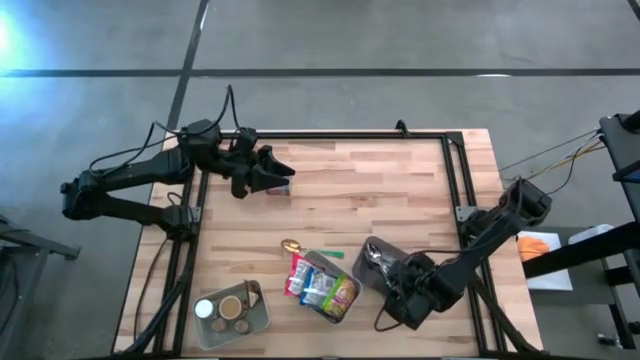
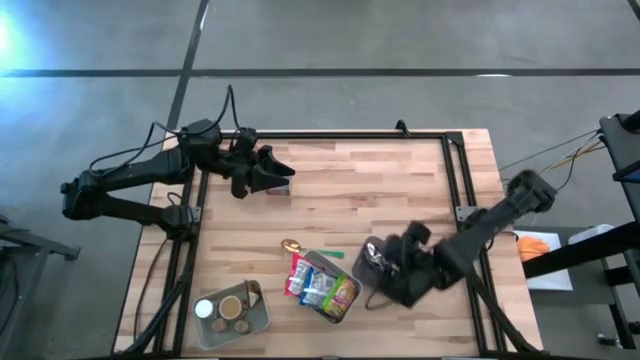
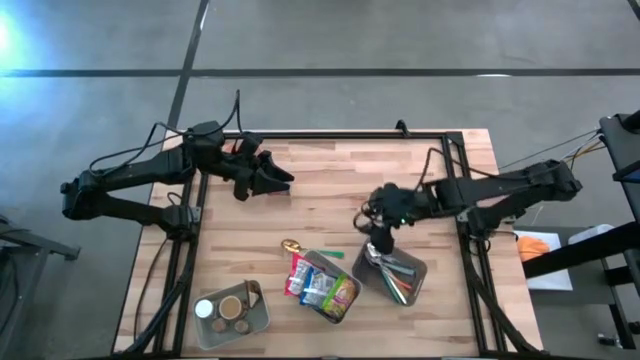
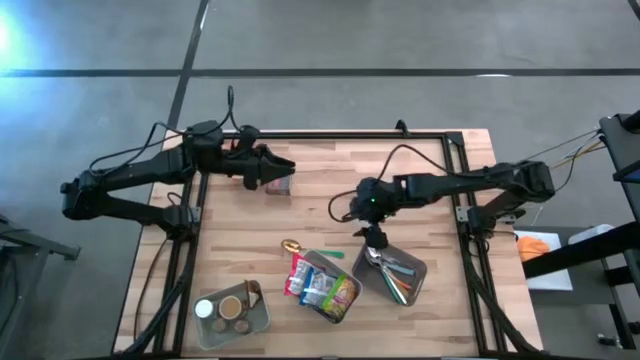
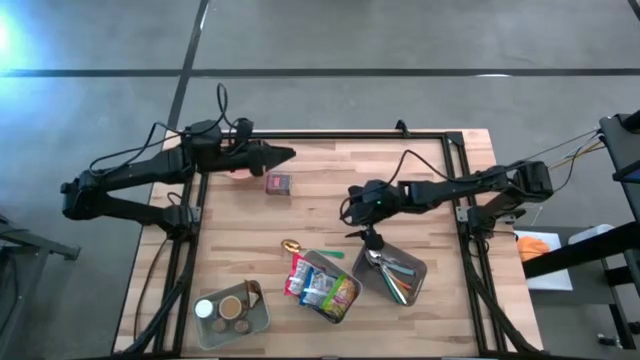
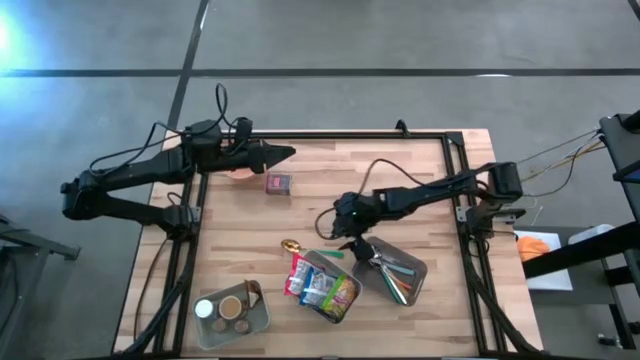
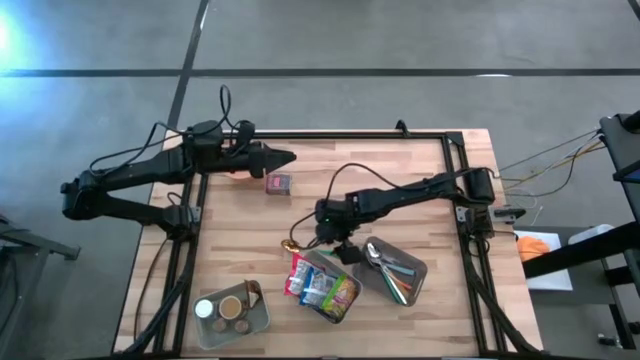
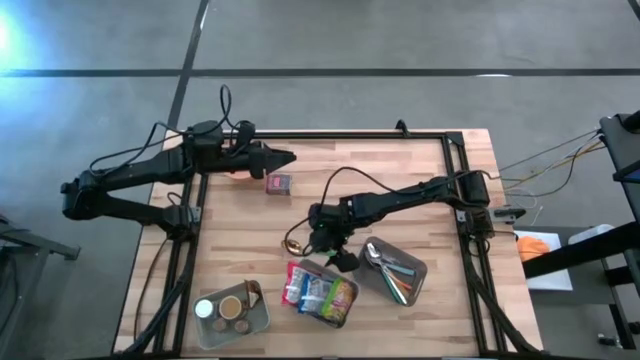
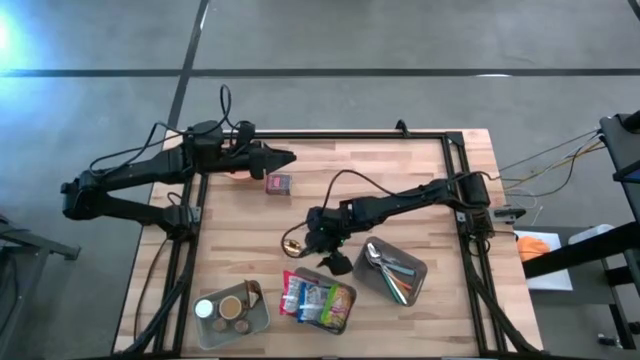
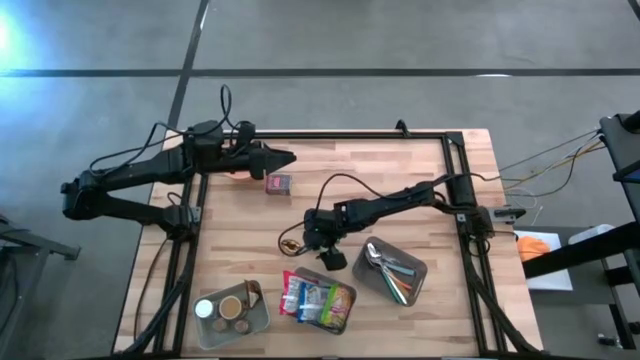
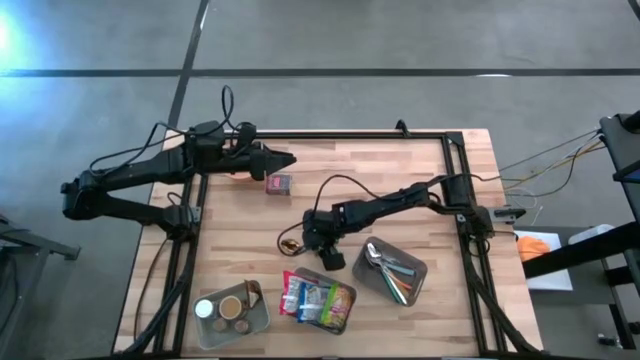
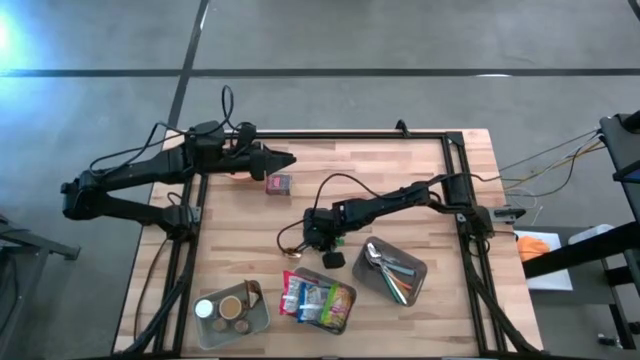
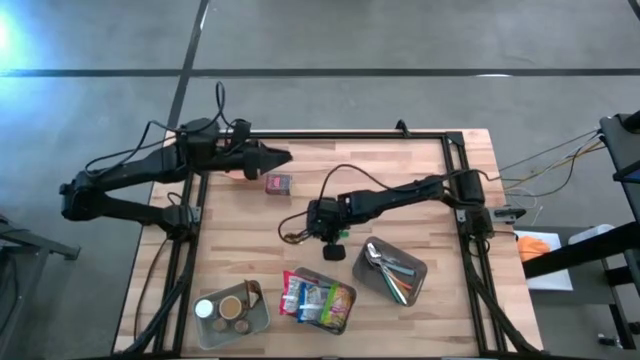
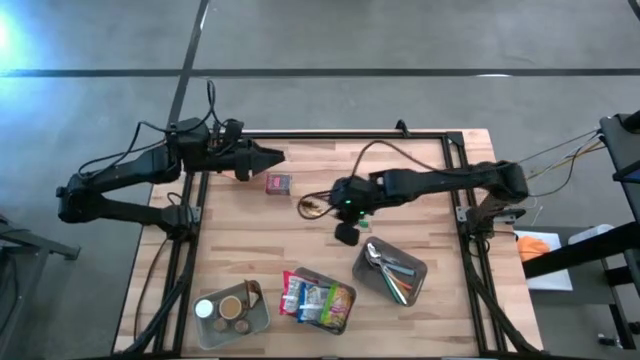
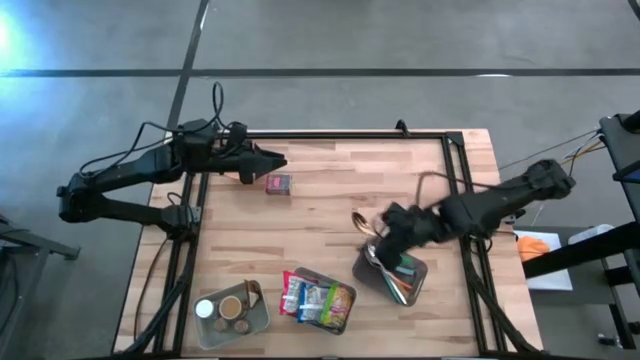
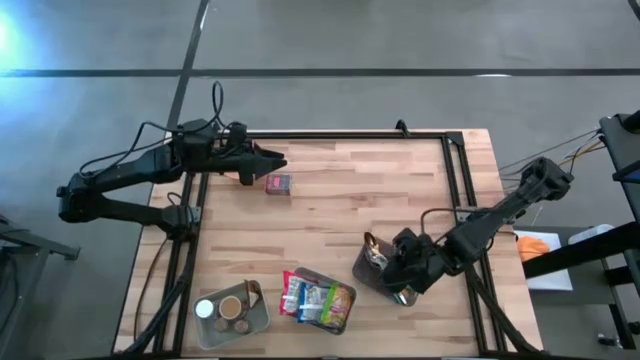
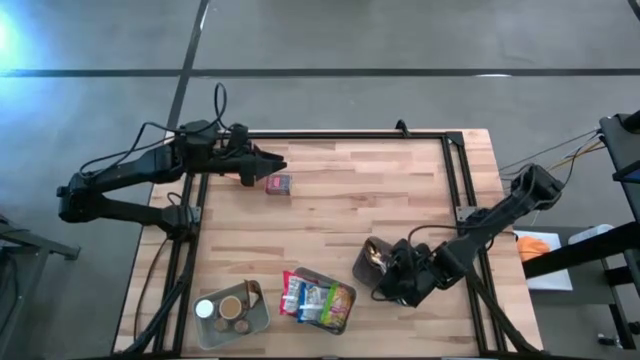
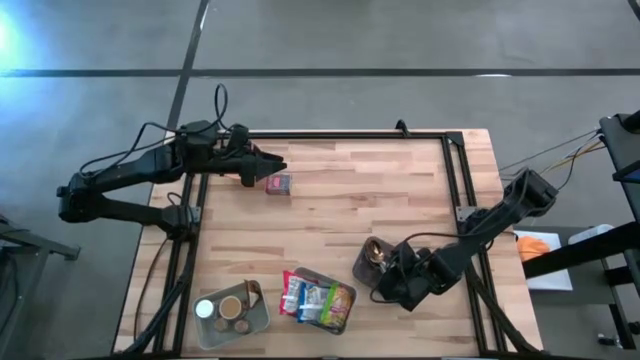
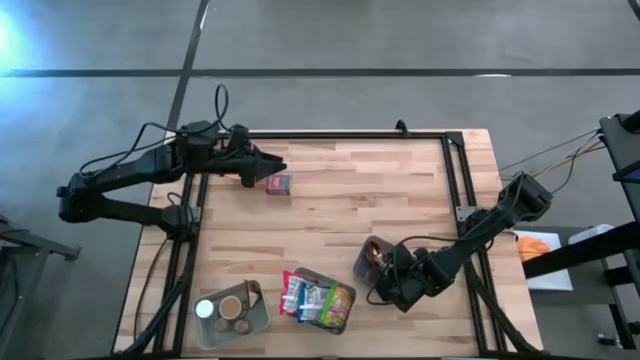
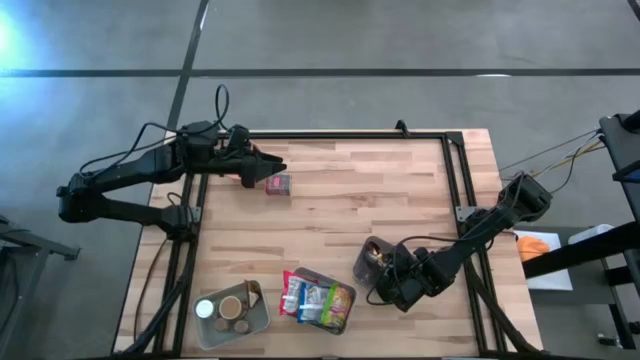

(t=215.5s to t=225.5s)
Put the green spoon into the black bin

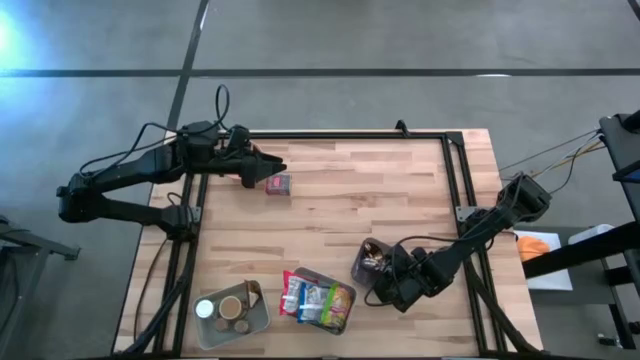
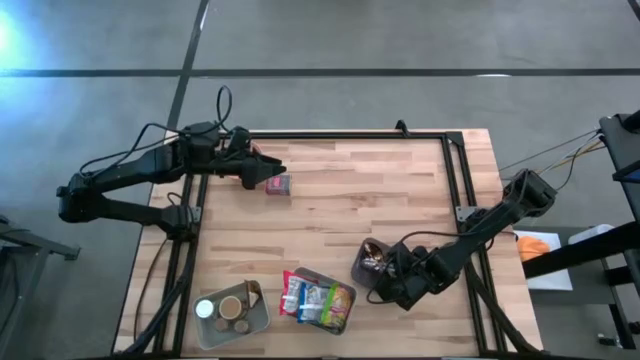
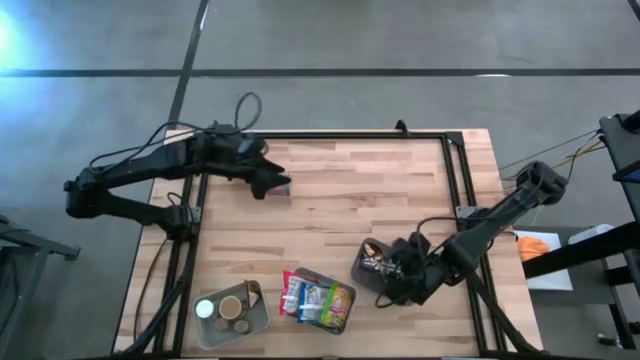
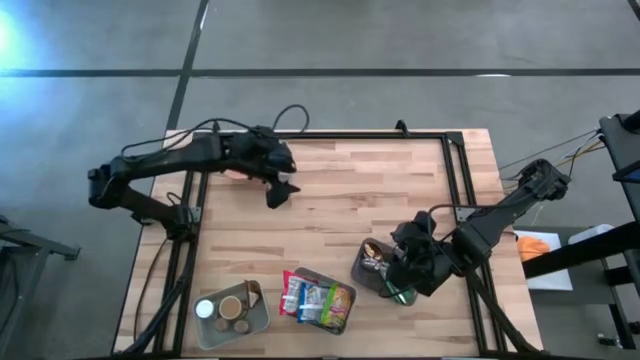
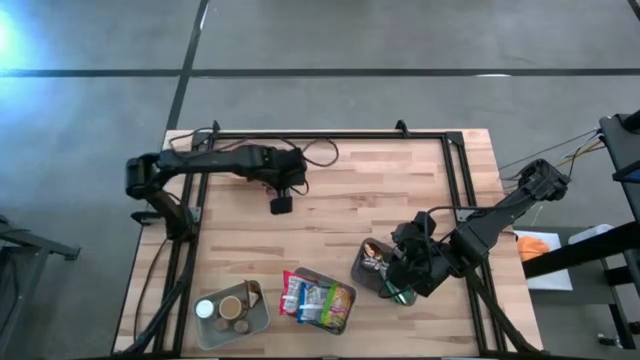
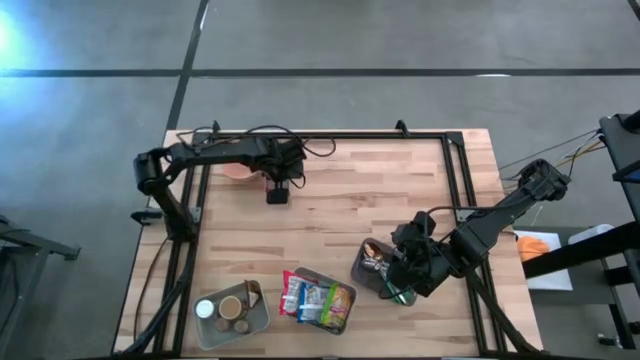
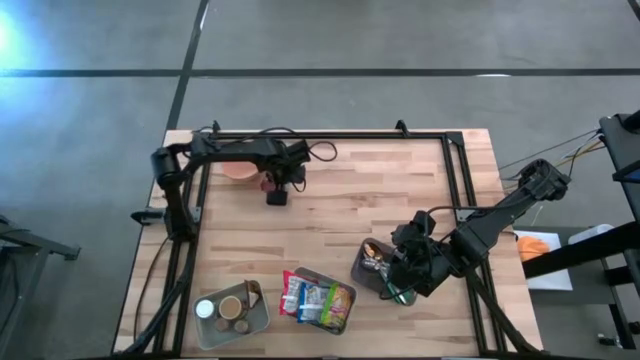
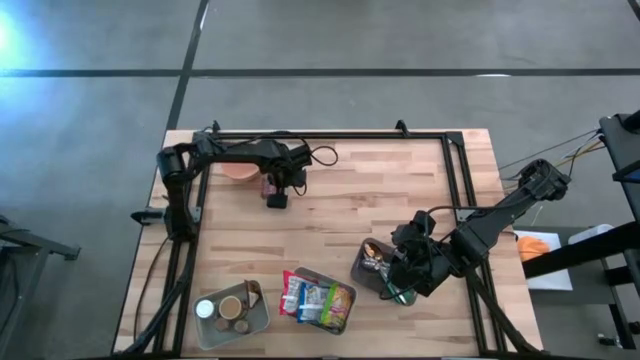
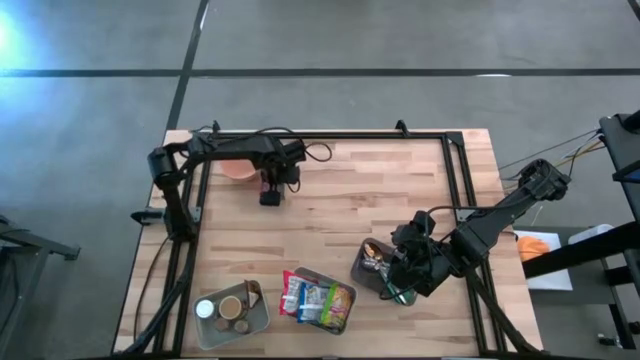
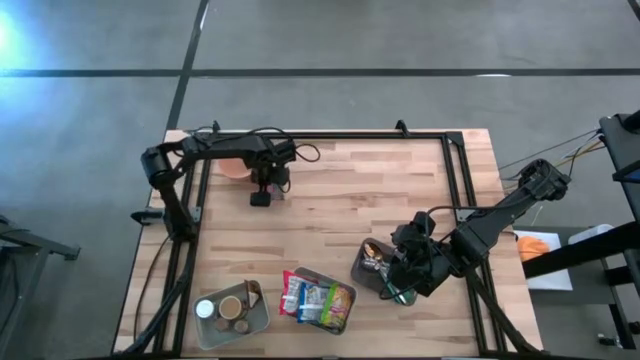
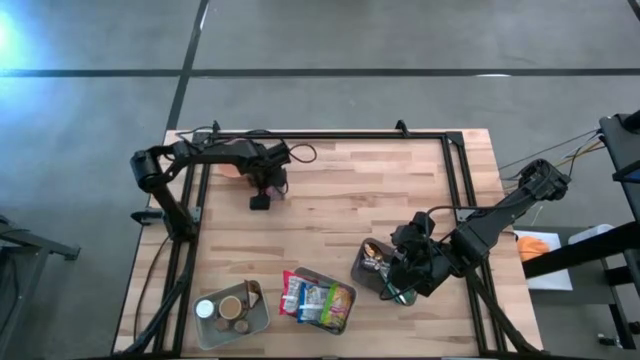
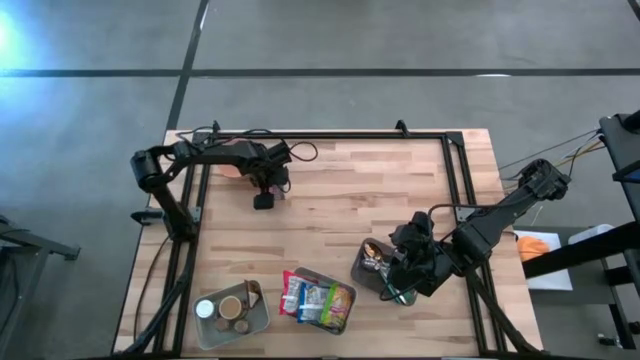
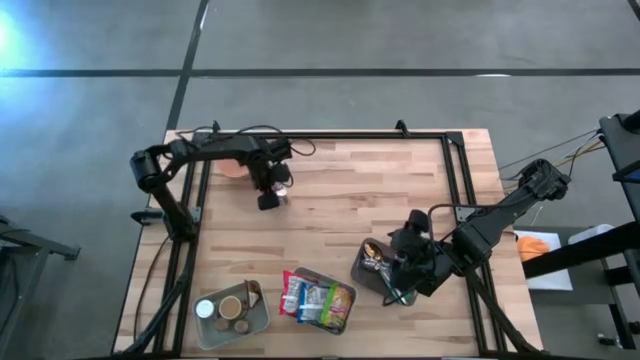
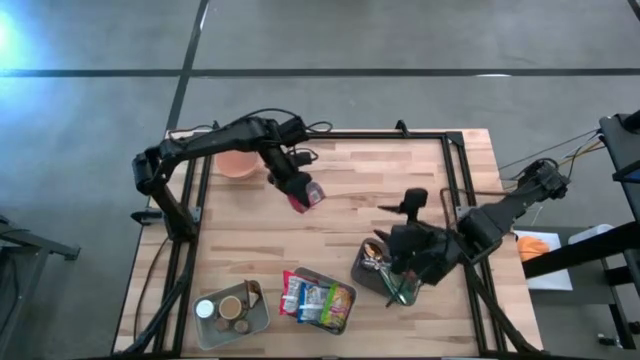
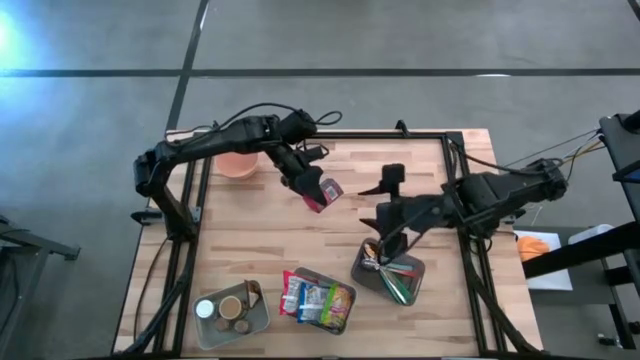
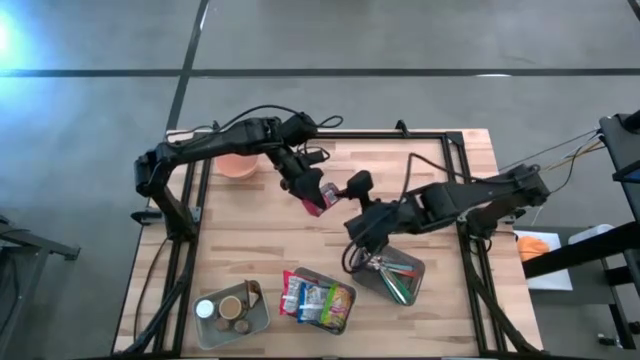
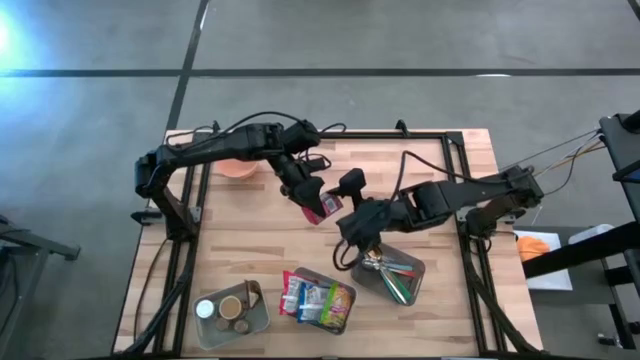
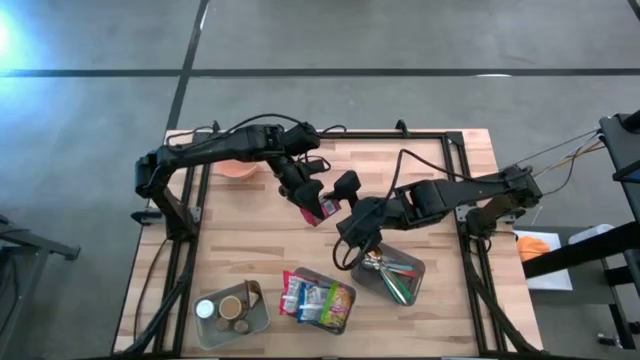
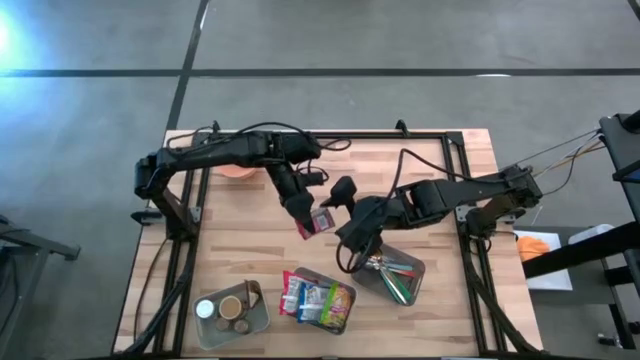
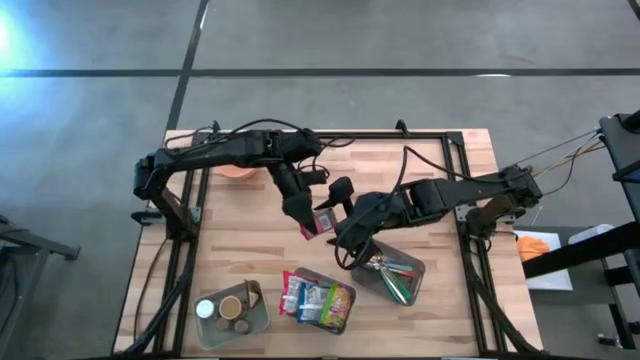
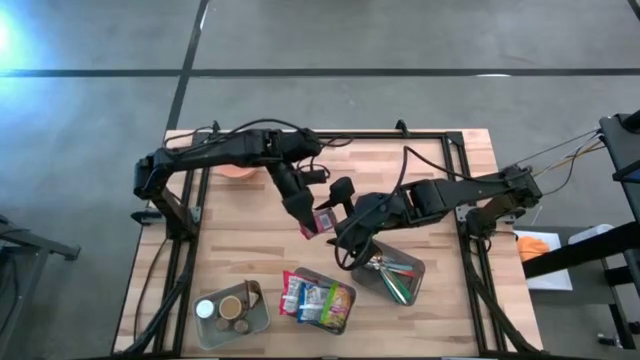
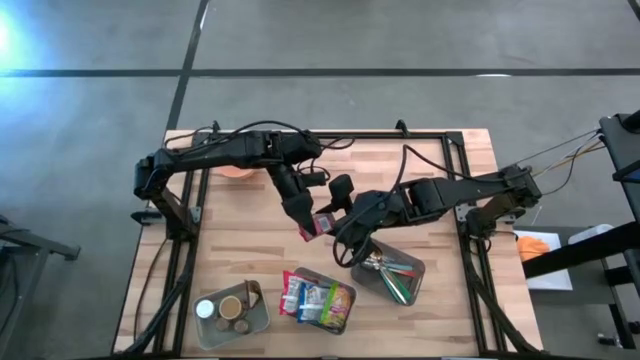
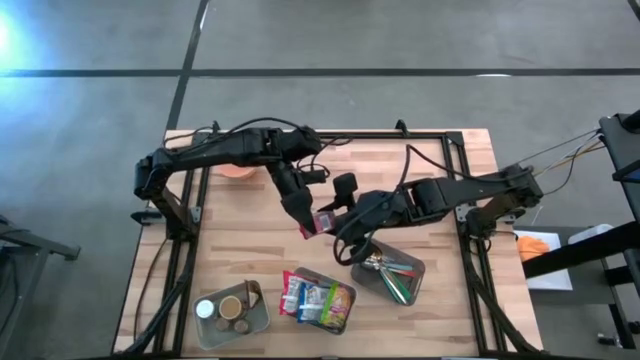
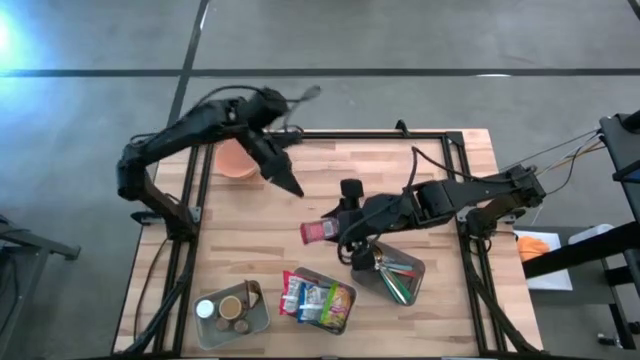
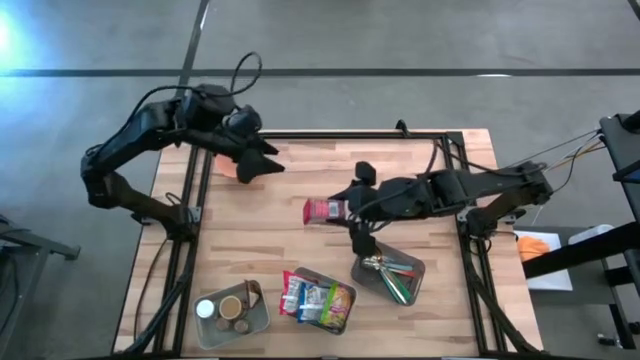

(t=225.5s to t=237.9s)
Put the red seasoning into the left gray bin
